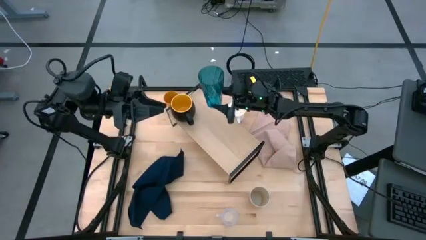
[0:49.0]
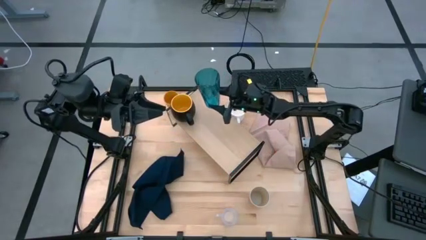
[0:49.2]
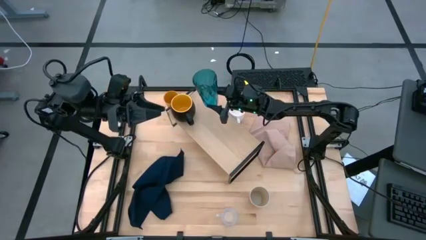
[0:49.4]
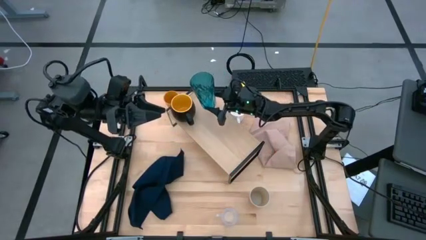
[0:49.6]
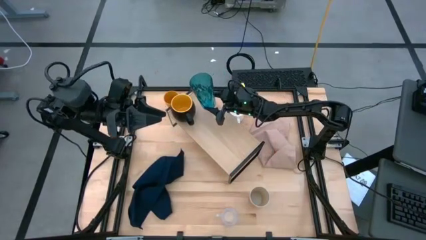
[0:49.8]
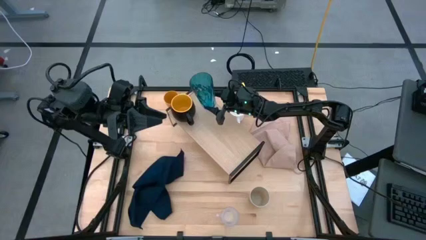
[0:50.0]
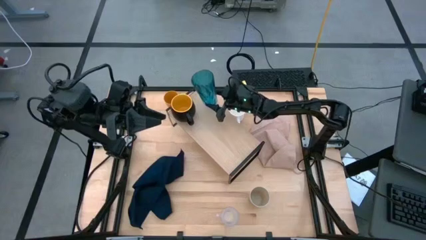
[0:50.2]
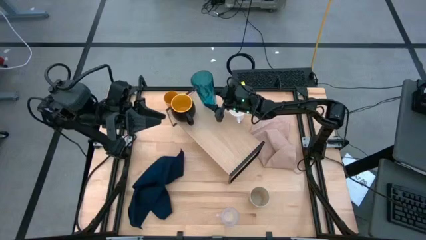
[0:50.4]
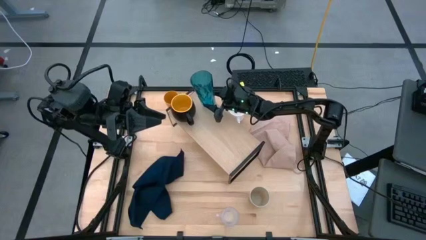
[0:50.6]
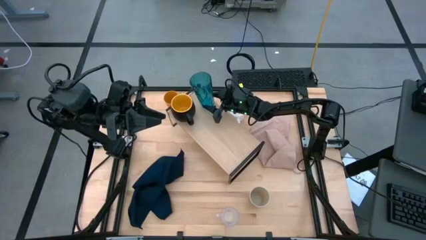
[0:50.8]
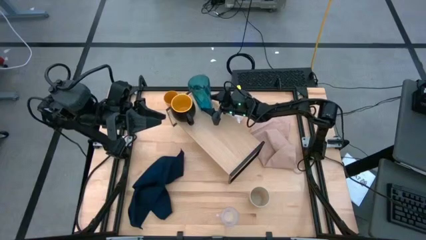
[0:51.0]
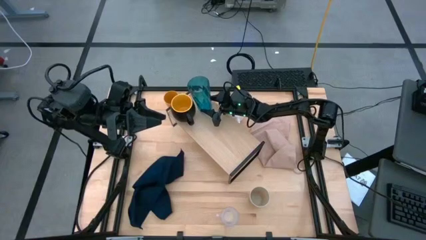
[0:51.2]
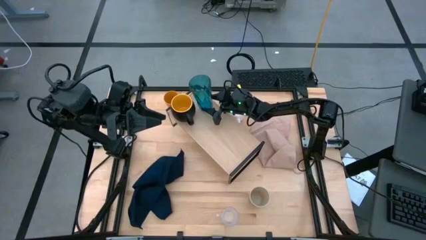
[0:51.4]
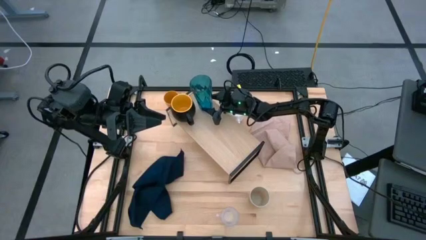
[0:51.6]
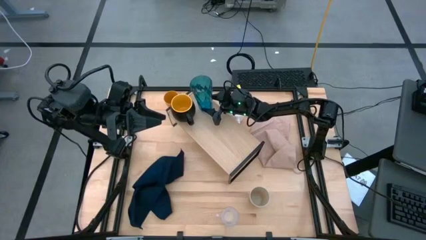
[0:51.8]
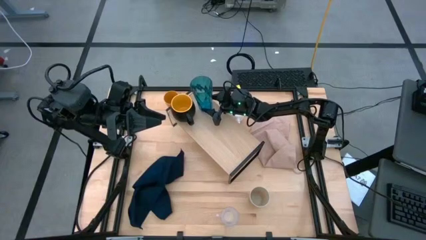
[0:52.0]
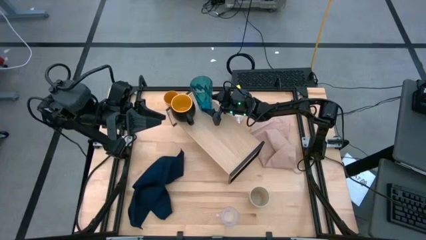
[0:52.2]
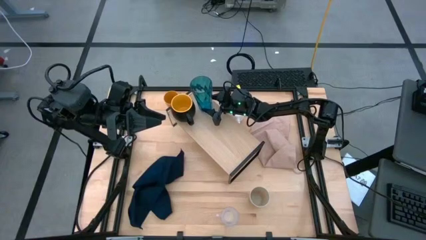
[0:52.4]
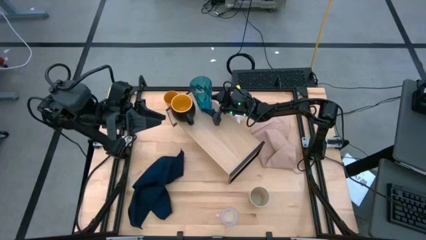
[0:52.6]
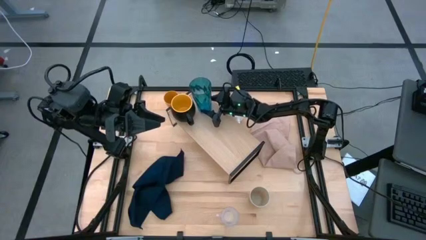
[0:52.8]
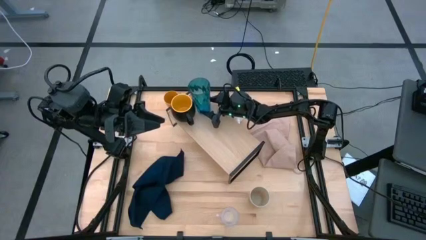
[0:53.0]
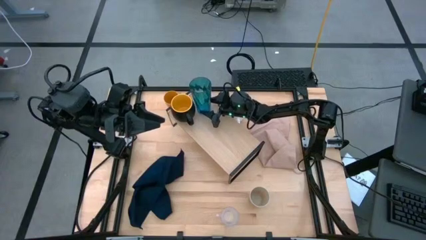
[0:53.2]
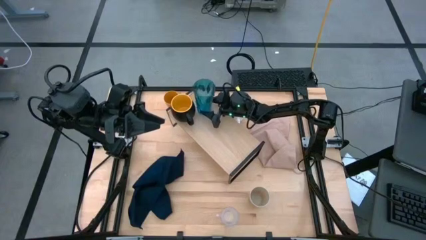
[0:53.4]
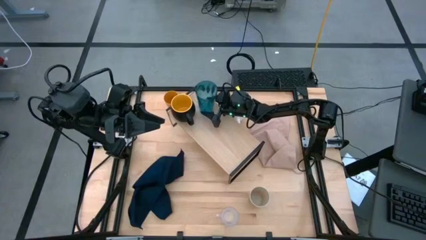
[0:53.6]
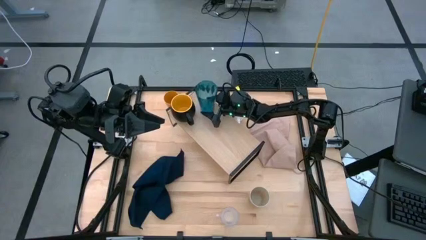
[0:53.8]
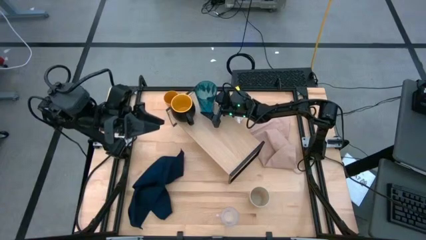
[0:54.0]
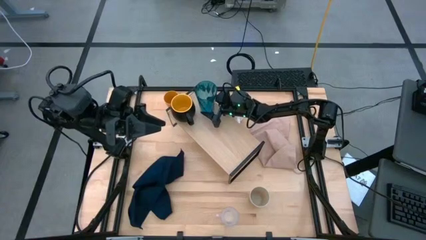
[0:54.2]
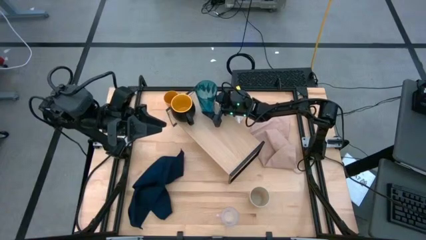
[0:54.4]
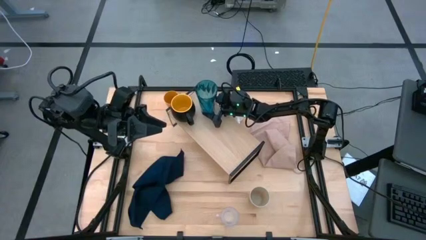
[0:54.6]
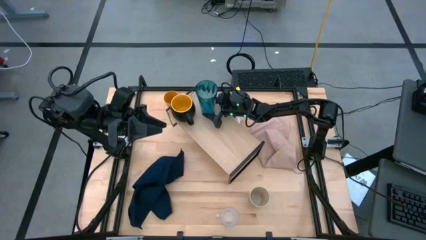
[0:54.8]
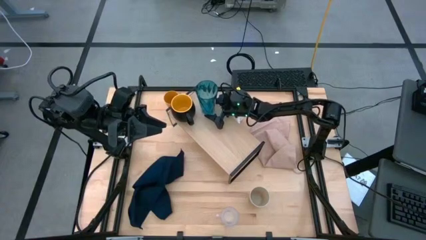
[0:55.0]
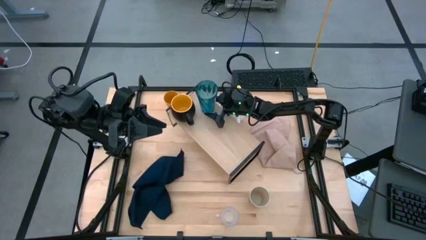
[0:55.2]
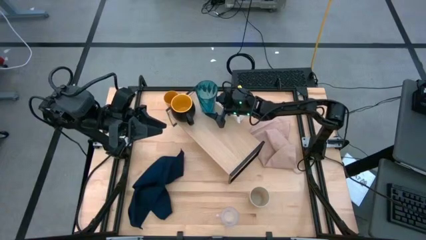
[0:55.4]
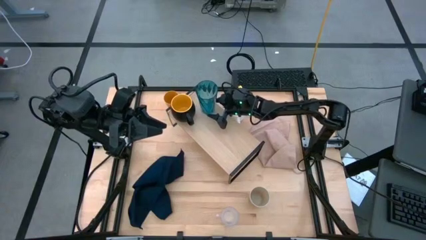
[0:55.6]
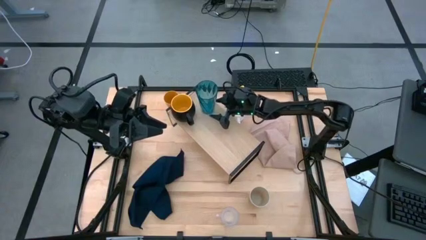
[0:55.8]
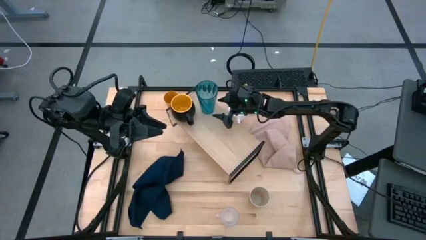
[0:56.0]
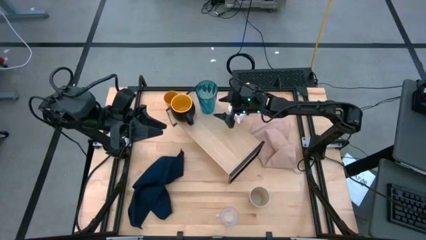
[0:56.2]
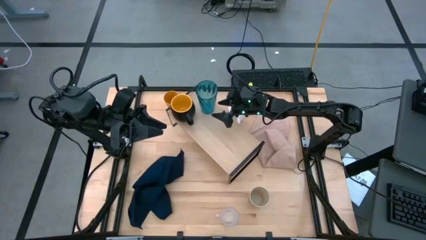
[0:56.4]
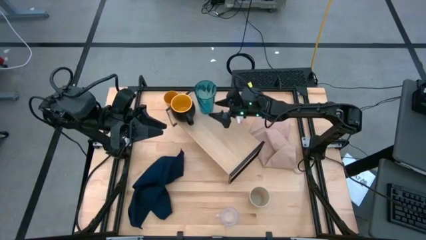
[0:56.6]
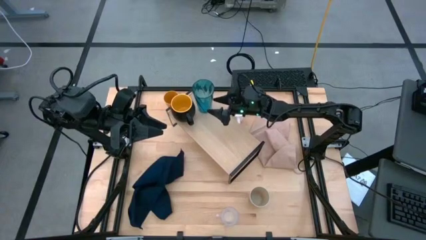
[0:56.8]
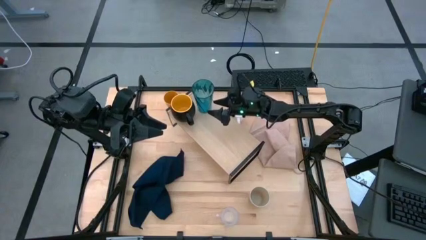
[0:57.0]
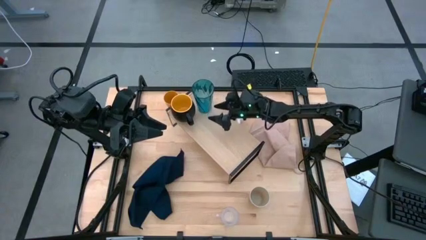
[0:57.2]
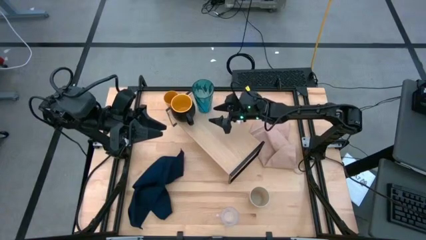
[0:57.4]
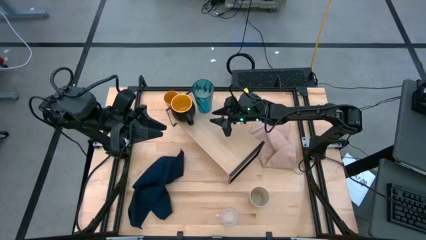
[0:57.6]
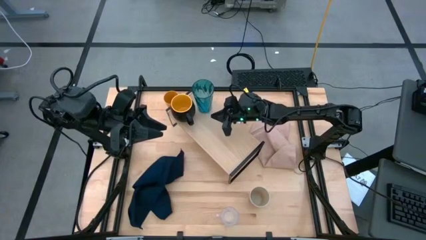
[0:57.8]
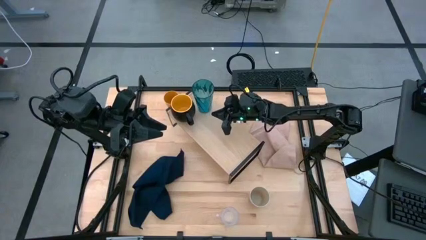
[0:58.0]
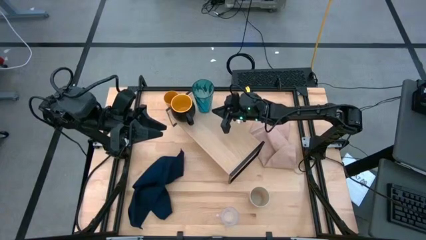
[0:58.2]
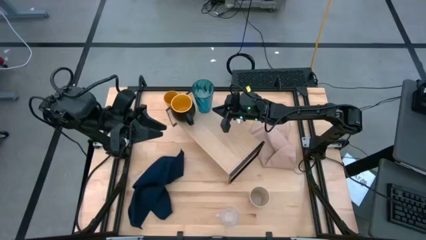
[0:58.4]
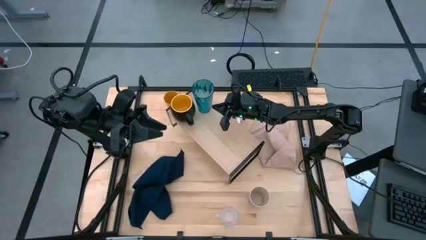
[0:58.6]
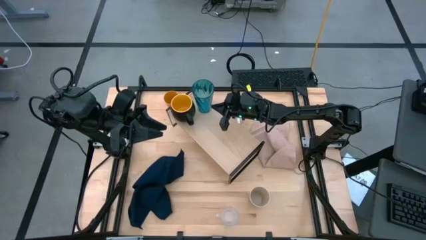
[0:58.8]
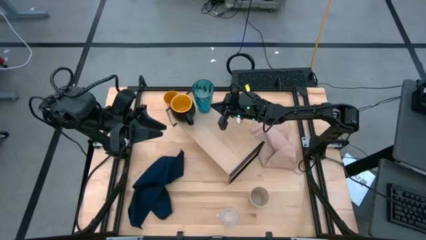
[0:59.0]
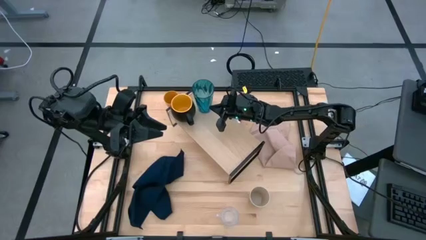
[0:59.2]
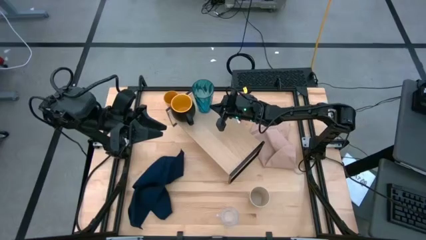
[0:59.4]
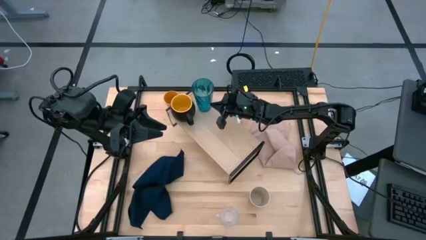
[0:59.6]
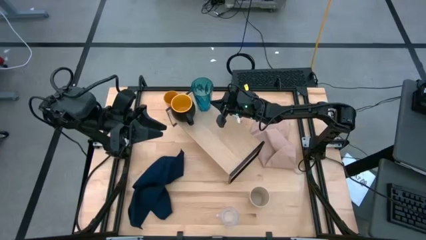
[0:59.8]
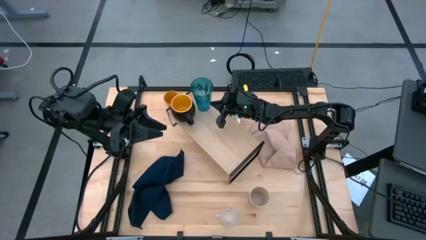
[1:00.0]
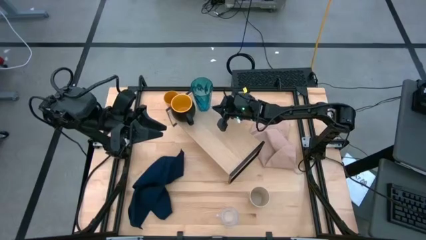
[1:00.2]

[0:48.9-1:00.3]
Task: Stack small to large cups/mugs on shelf
Put the blue cup on the shelf
